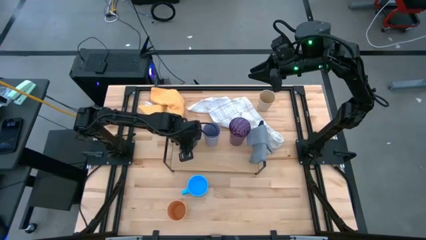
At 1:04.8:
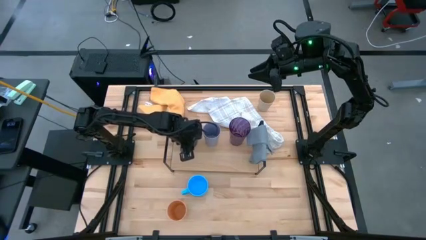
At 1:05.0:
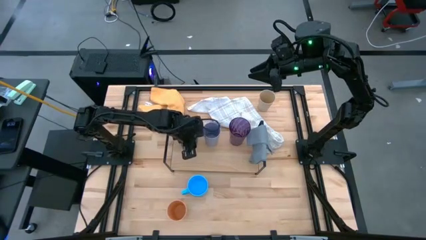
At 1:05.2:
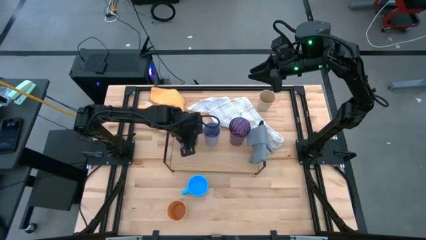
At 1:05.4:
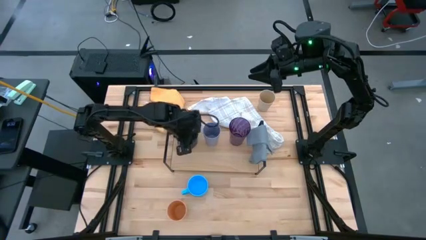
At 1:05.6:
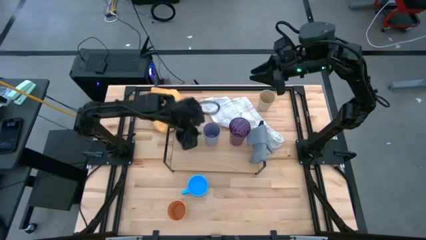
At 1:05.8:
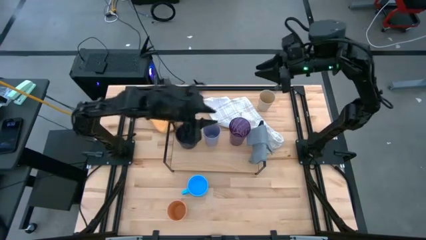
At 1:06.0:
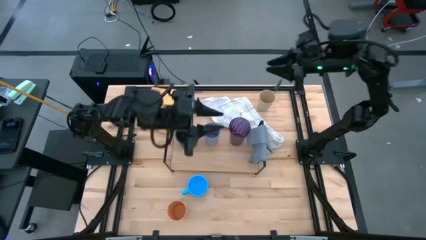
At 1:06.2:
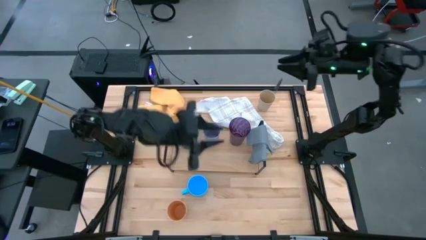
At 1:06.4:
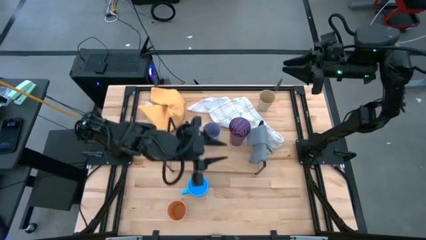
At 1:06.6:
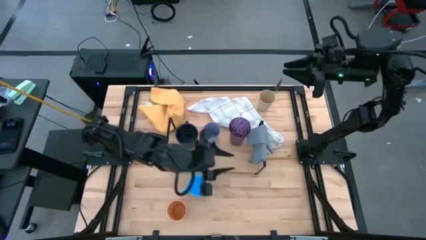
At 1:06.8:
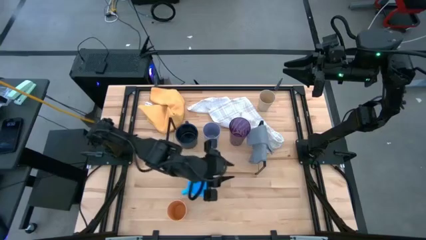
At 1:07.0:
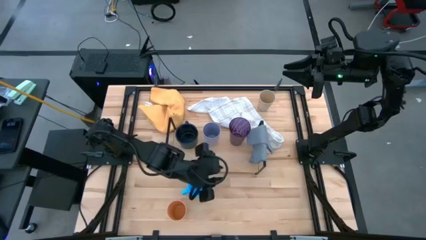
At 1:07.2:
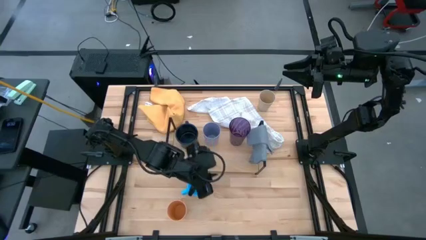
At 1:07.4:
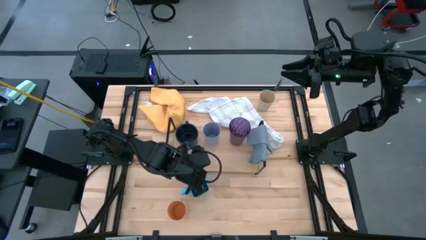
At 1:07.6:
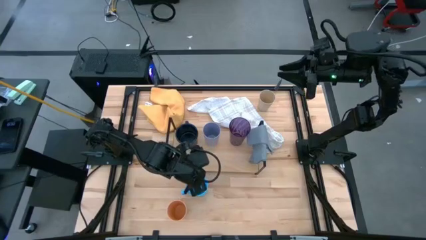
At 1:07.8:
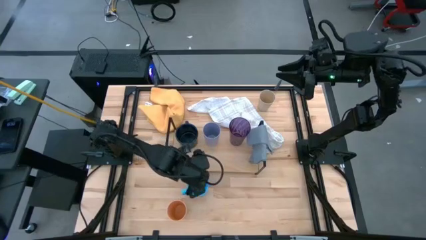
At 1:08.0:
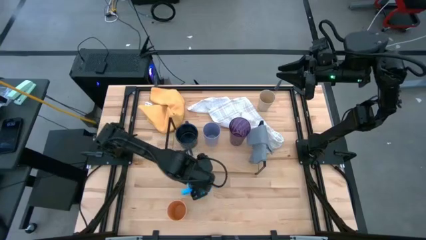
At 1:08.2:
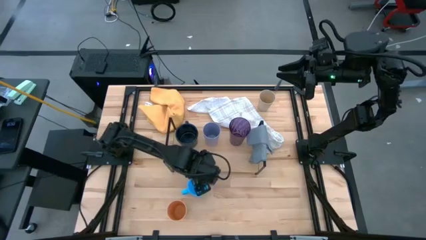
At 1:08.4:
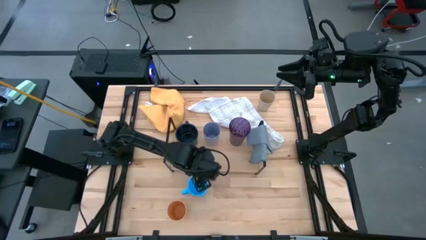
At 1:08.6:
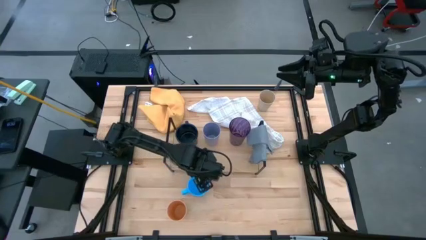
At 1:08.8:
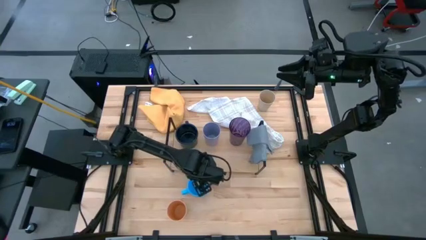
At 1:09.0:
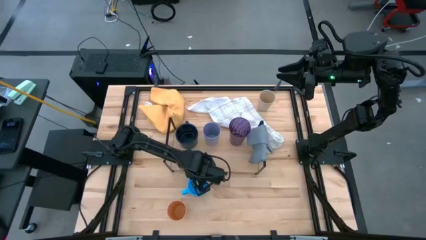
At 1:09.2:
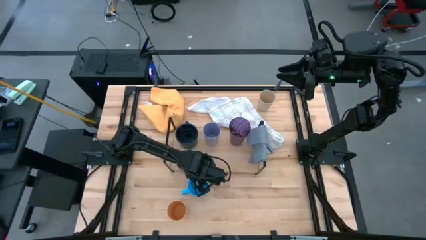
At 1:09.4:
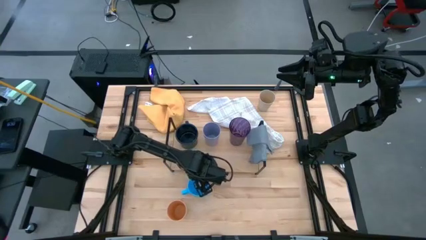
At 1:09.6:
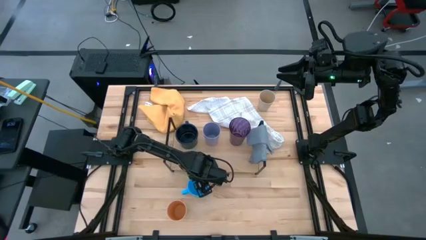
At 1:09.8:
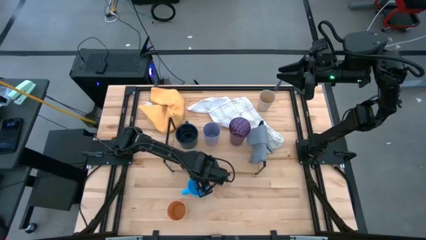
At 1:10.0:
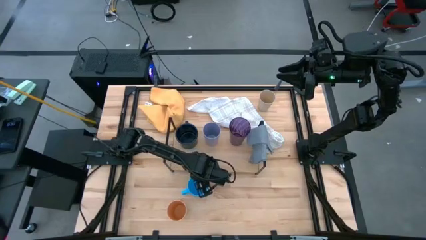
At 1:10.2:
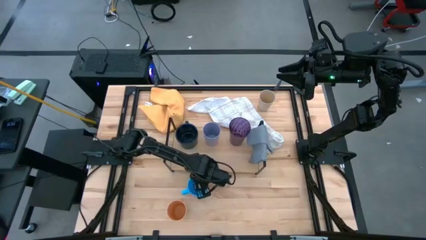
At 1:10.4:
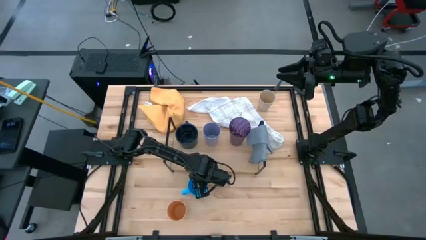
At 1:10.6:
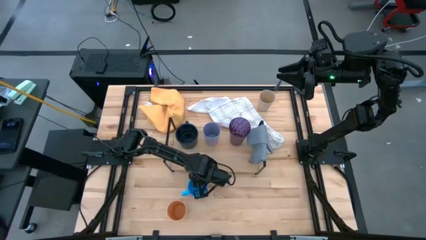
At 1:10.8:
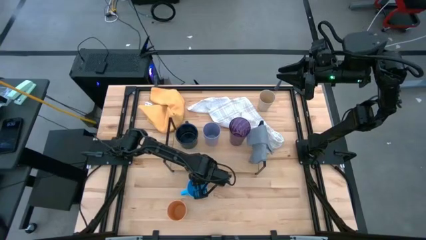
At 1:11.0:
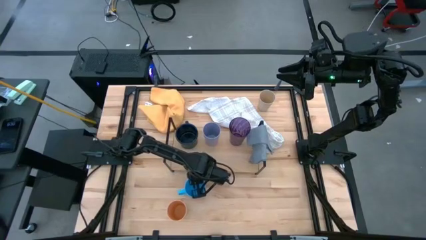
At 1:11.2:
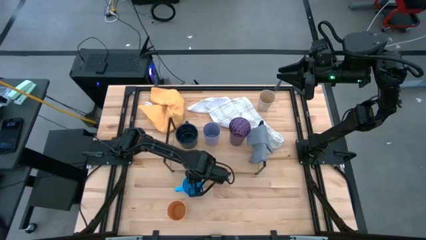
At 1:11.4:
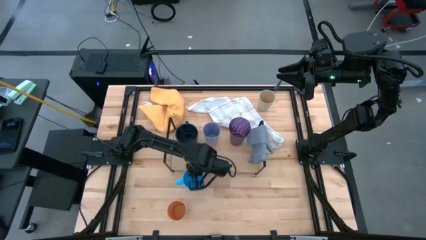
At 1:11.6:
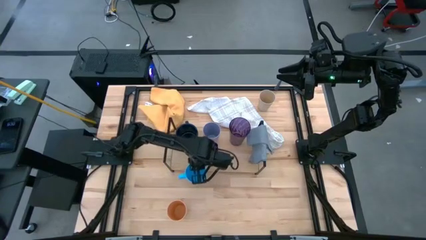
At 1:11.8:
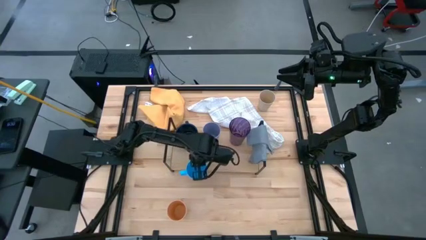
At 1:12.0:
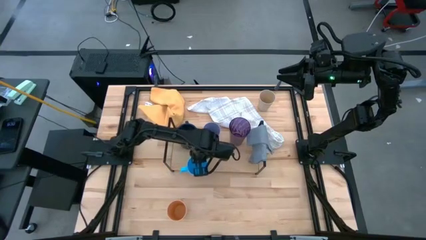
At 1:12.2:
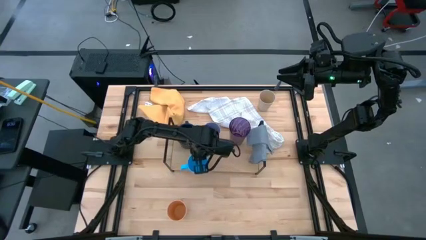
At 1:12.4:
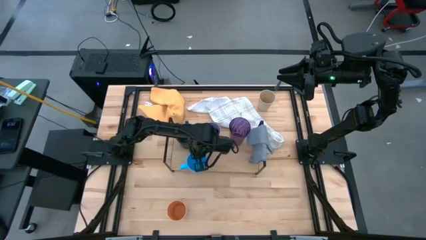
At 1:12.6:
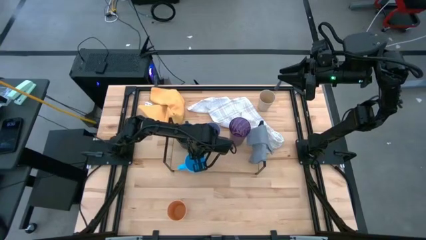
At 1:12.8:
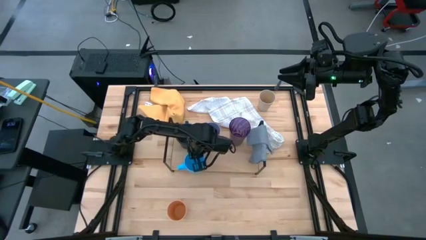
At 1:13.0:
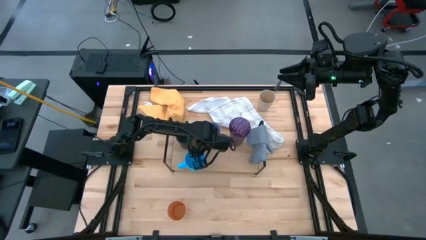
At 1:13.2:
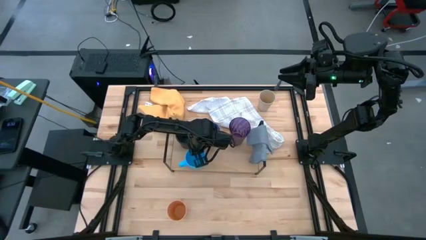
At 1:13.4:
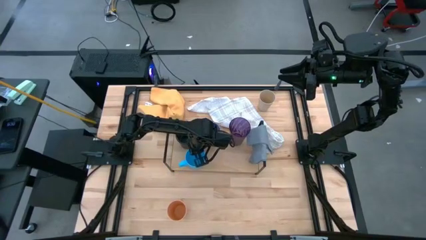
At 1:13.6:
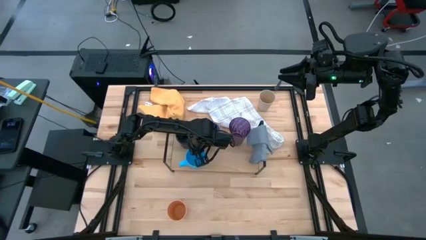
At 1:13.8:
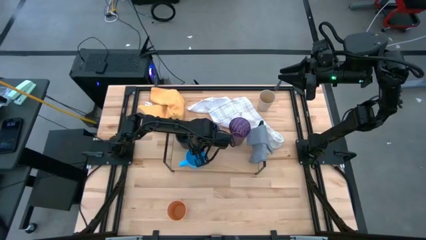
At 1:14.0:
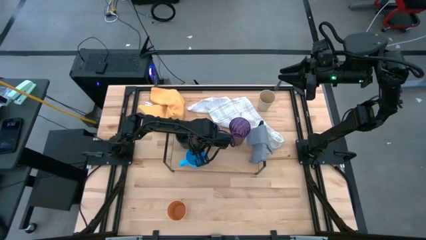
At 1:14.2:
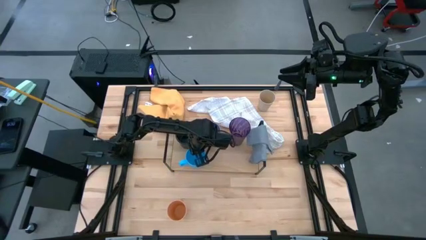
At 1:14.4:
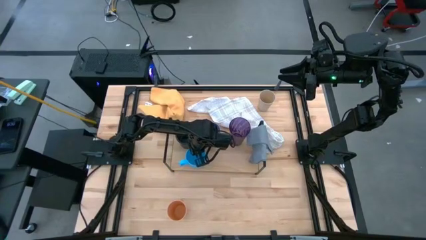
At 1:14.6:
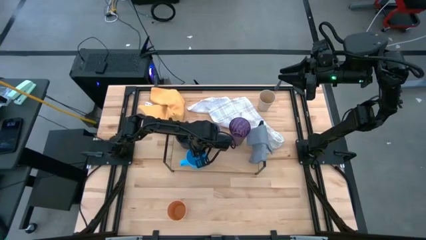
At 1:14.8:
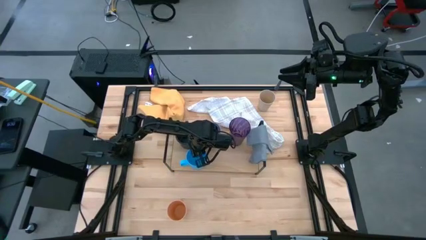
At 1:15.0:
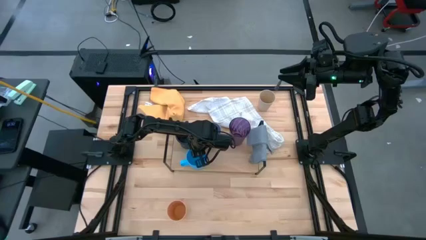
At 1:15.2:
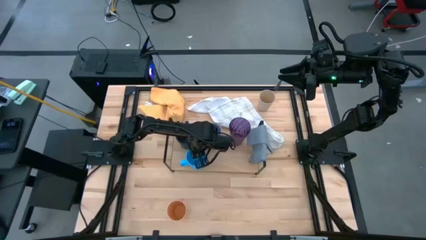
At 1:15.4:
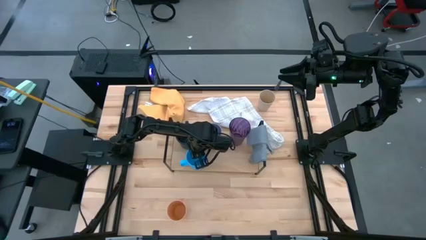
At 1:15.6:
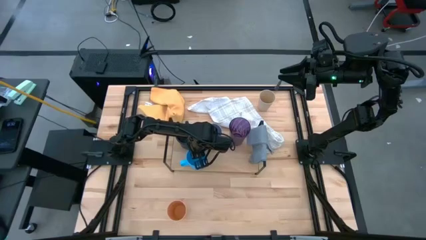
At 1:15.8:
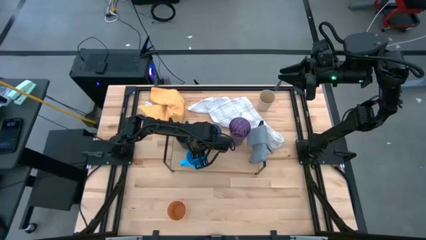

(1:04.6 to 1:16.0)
Task: Stack small to large cups/mugs on shelf
Put the light blue mug on the shelf

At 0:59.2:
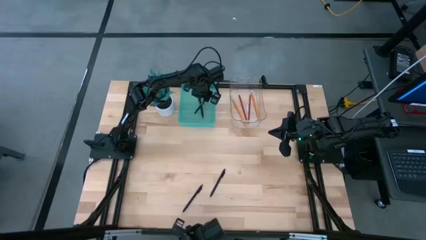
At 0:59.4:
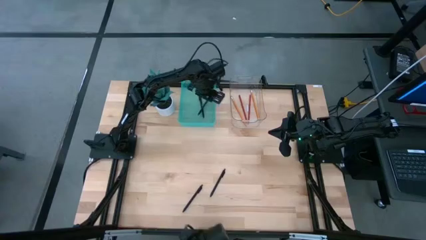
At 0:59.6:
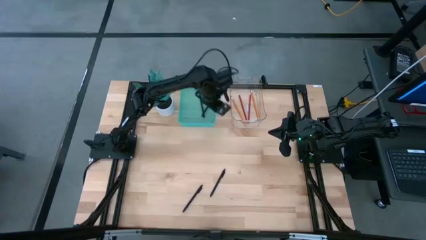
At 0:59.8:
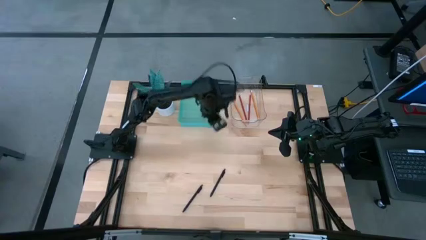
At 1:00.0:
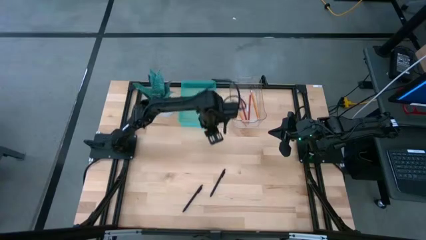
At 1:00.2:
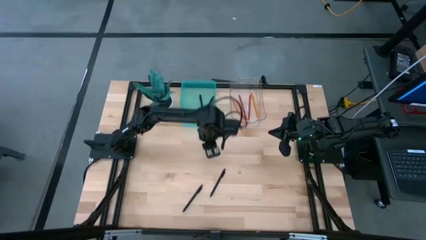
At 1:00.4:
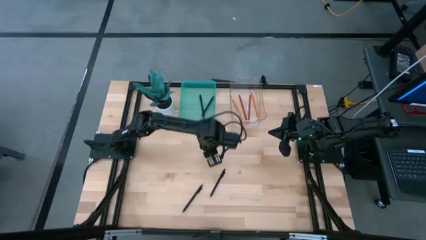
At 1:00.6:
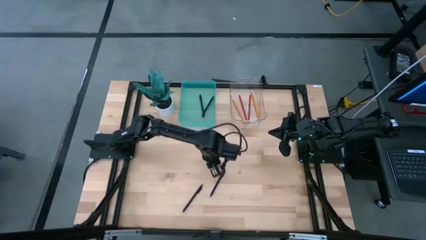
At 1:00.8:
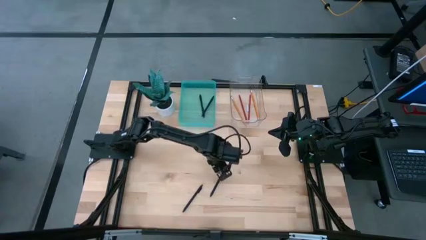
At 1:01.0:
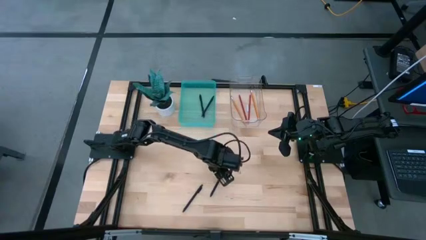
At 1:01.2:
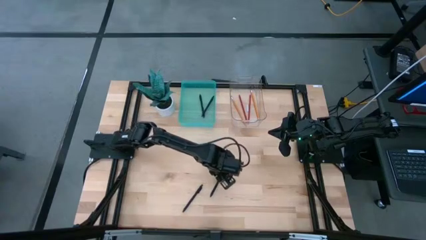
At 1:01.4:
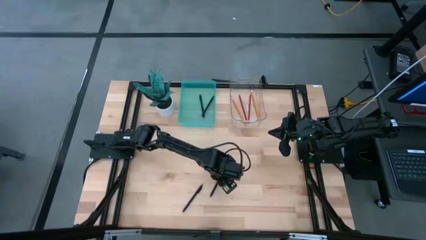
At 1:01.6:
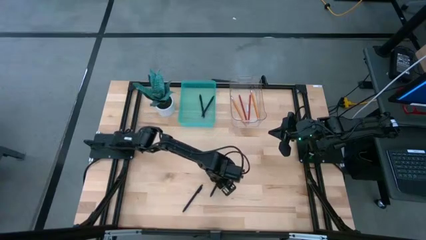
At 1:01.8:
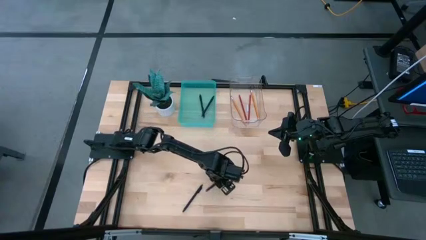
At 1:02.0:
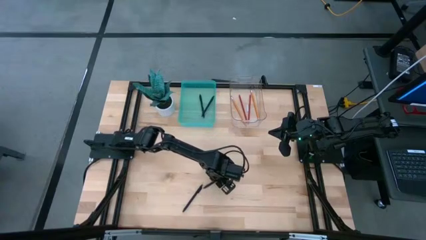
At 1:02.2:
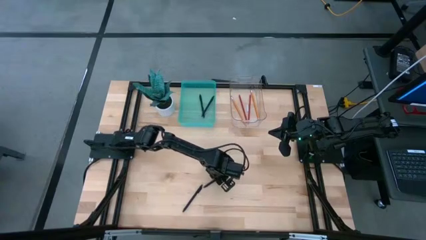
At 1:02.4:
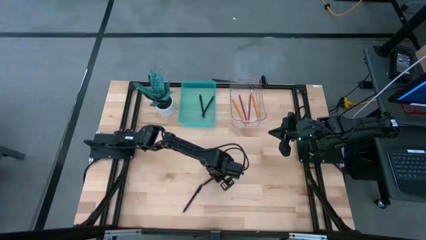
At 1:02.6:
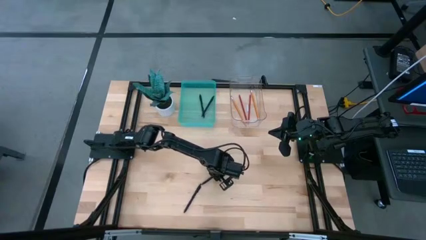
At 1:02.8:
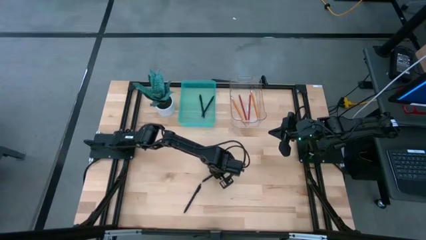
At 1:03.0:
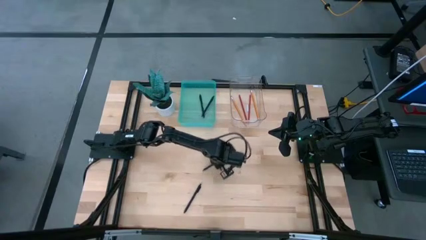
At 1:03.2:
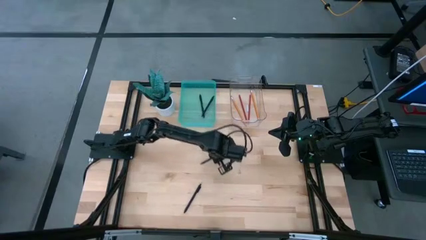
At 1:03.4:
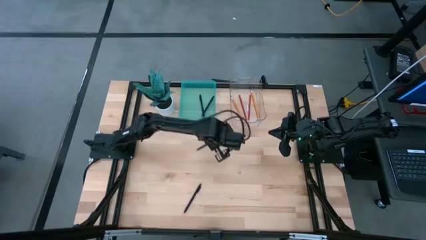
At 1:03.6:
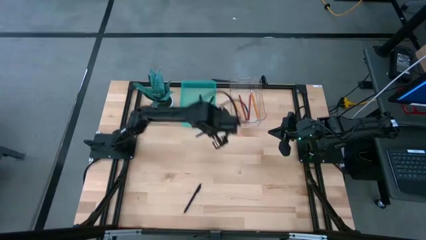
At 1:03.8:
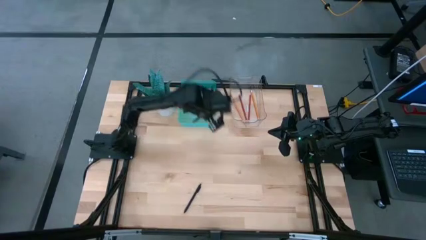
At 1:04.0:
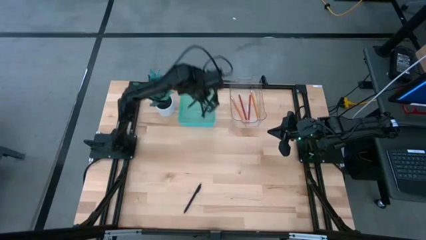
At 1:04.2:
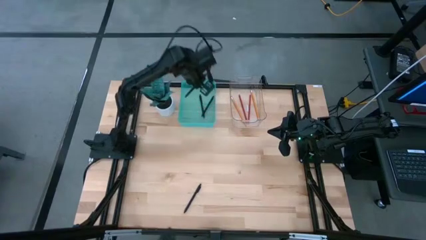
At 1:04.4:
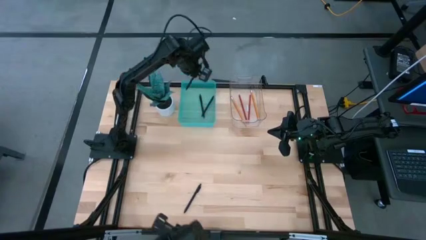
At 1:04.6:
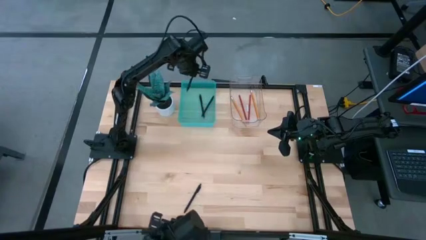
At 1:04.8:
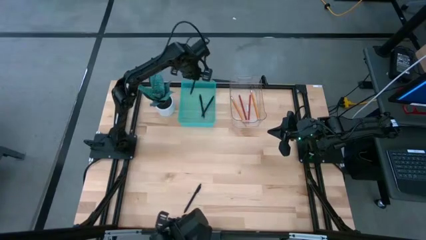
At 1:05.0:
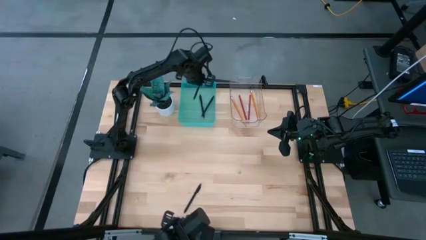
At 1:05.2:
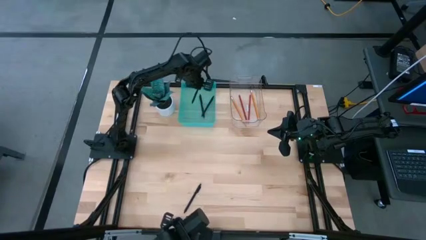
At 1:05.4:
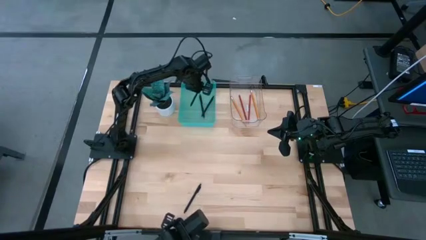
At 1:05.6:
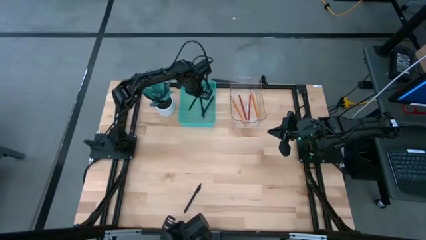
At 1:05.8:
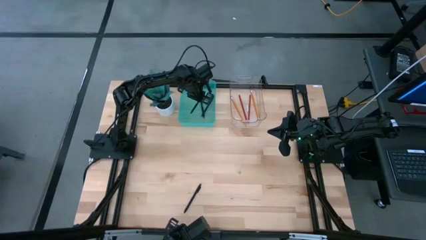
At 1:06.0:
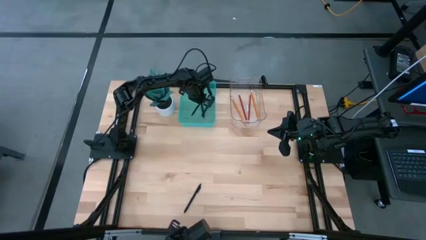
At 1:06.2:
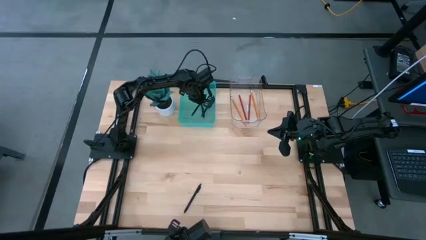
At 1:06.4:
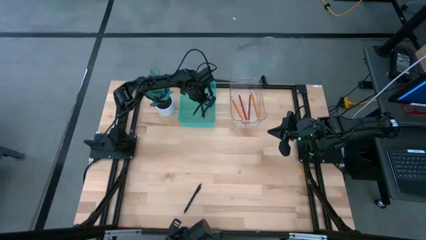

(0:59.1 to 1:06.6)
Task: Sort pens & pencils
Put the black pen into the green bin
